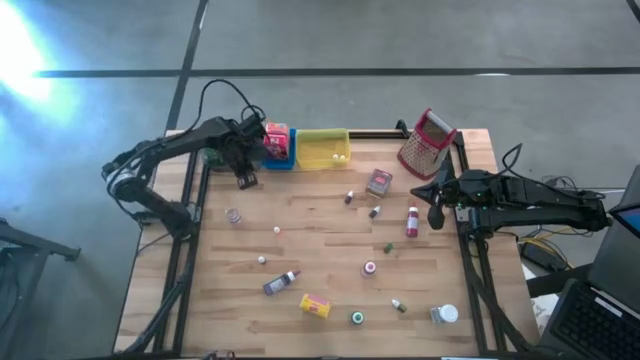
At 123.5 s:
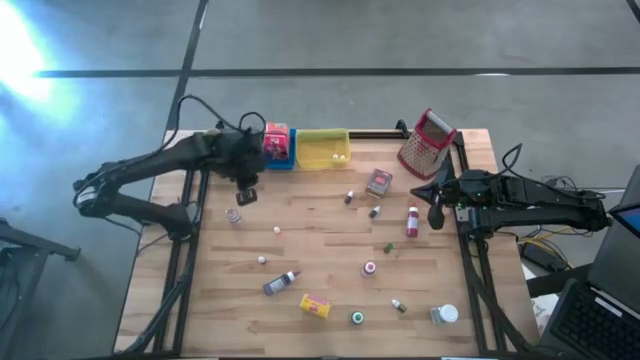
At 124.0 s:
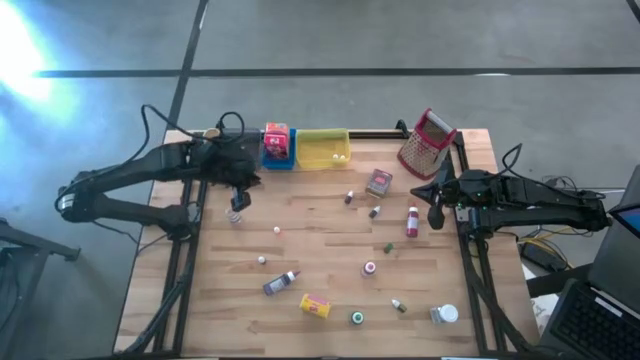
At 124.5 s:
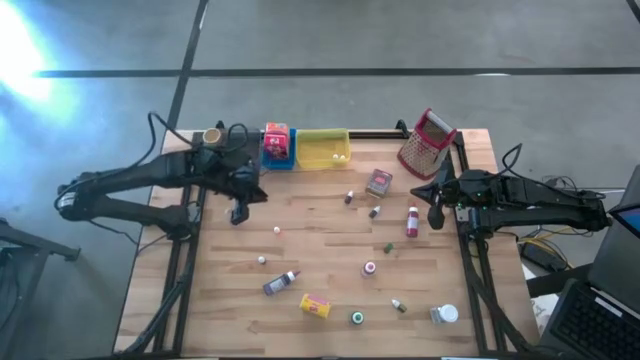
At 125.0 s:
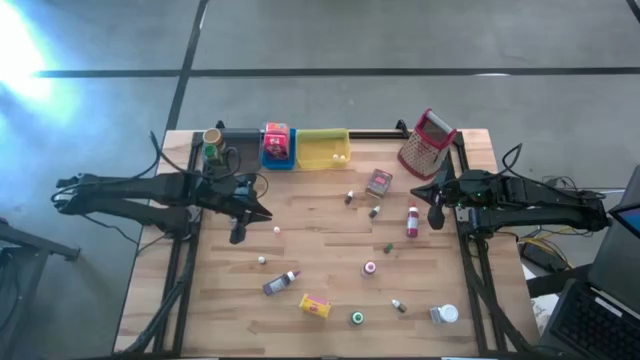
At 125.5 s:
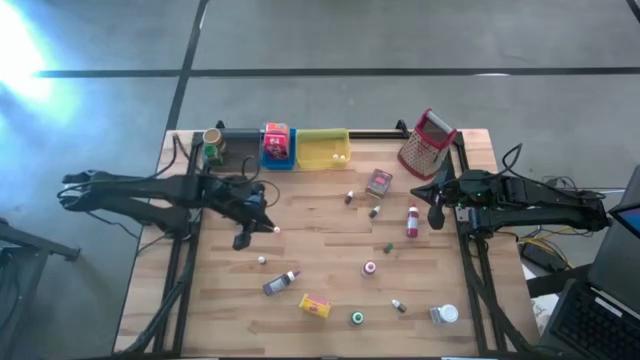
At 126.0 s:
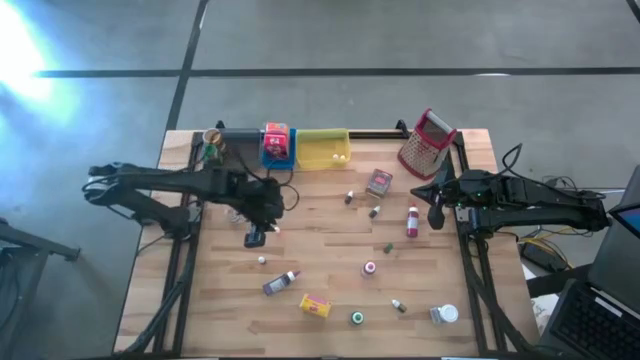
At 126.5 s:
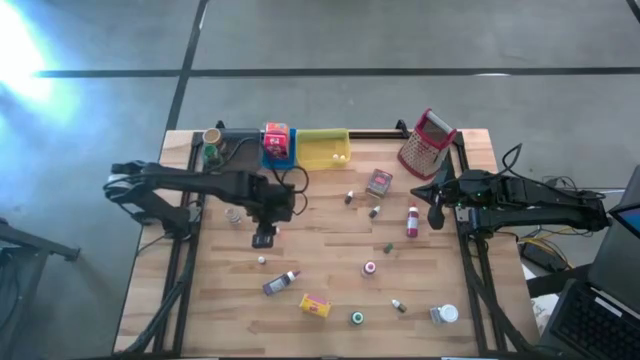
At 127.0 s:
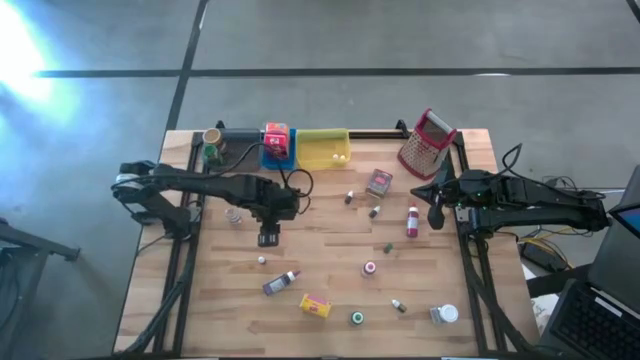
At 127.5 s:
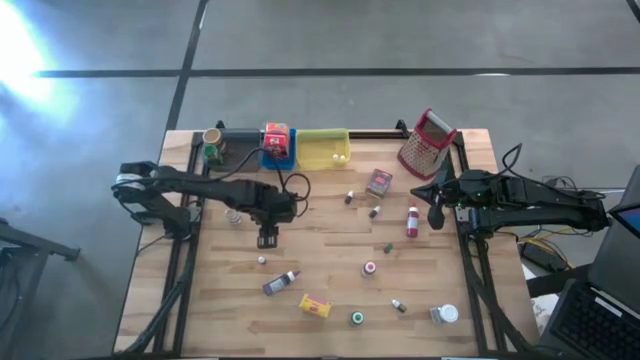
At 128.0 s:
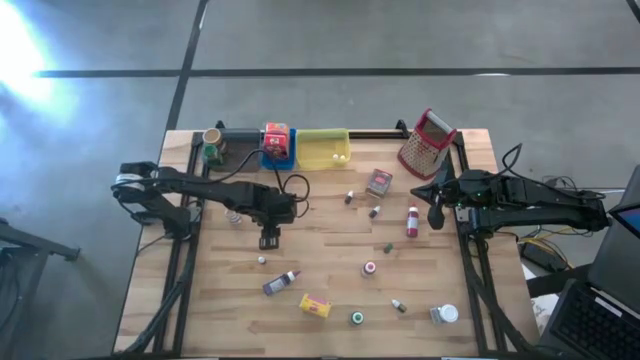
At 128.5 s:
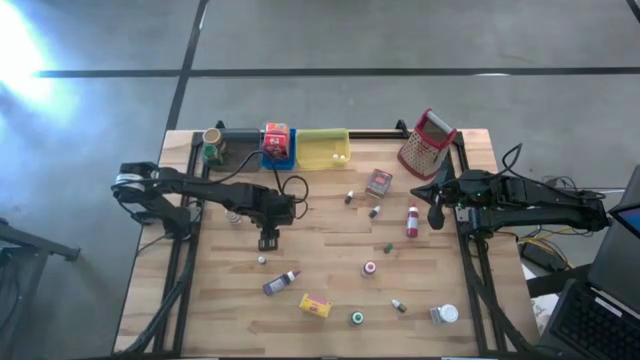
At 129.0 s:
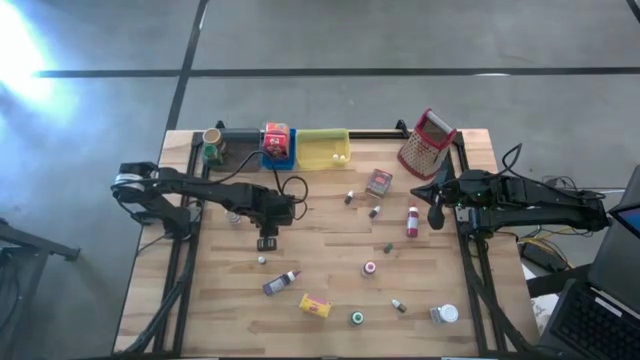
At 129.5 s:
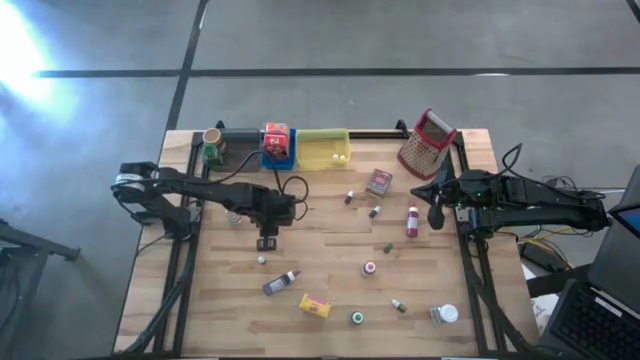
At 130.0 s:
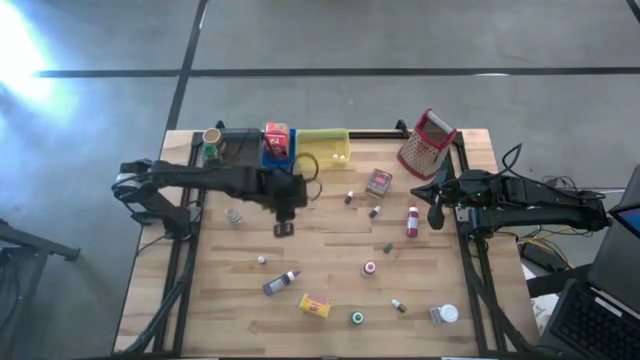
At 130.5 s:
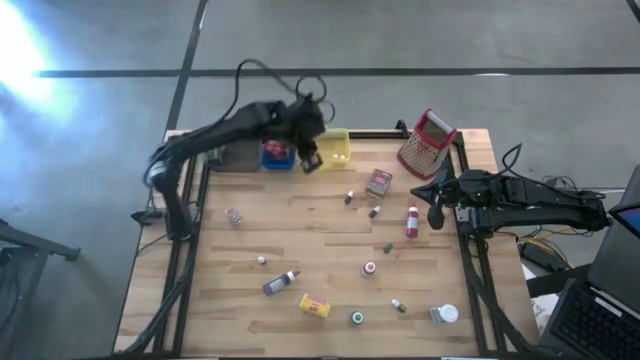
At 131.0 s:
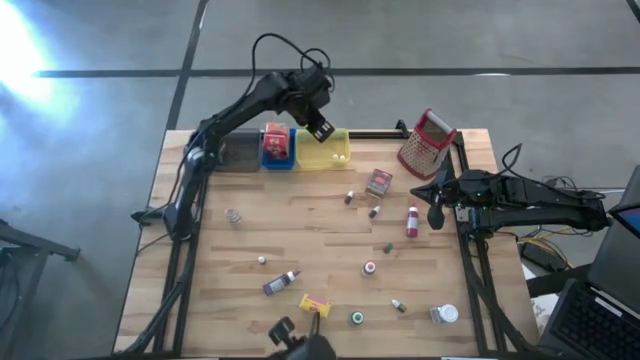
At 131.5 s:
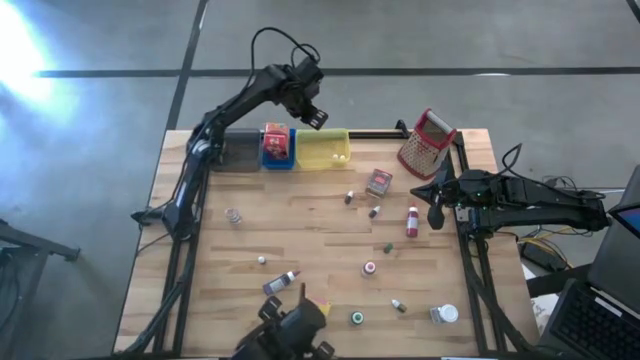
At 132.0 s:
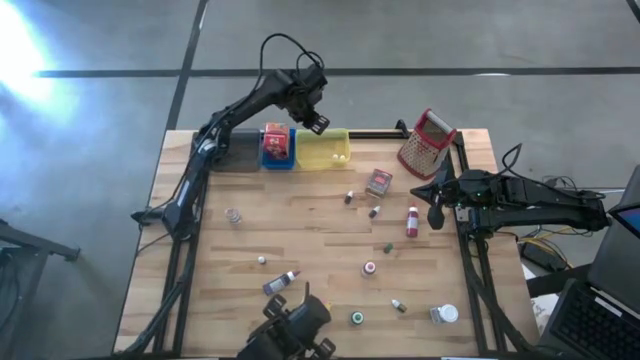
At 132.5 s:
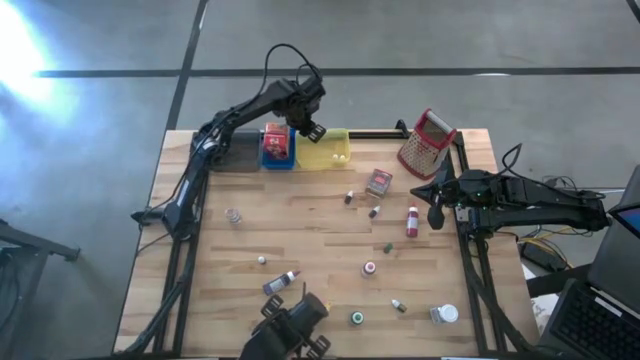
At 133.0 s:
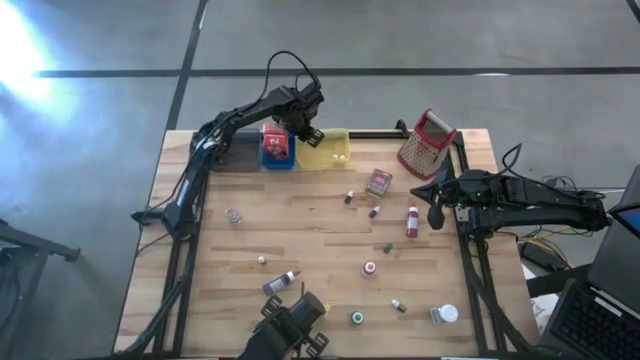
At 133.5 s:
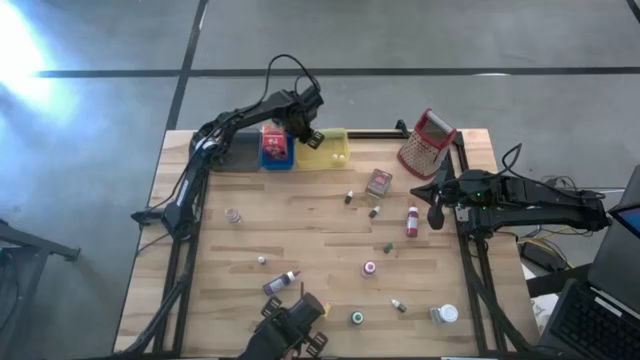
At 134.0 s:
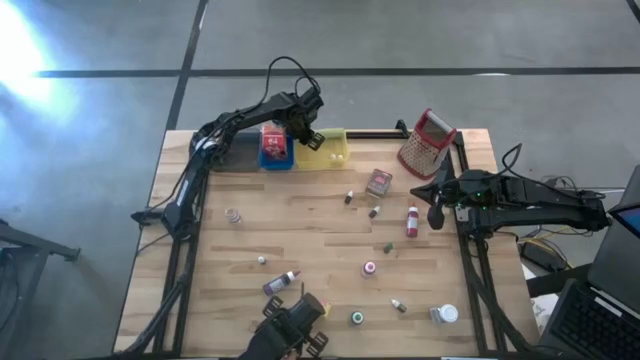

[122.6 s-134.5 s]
Task: Pick & Place Kitchen Items
Put the orange food coloring bottle into the yellow bin

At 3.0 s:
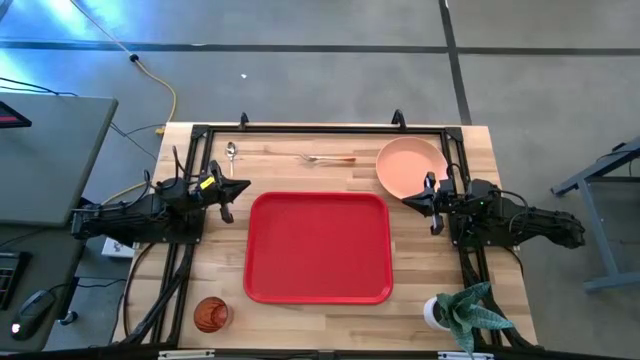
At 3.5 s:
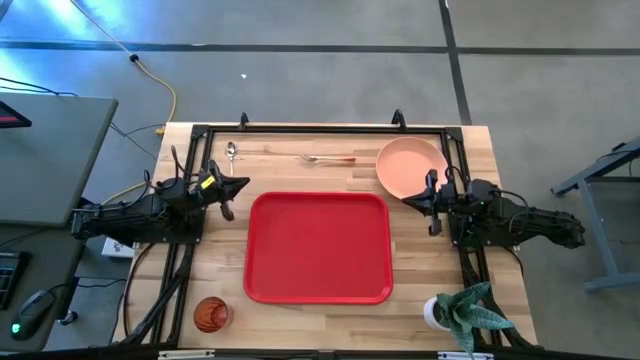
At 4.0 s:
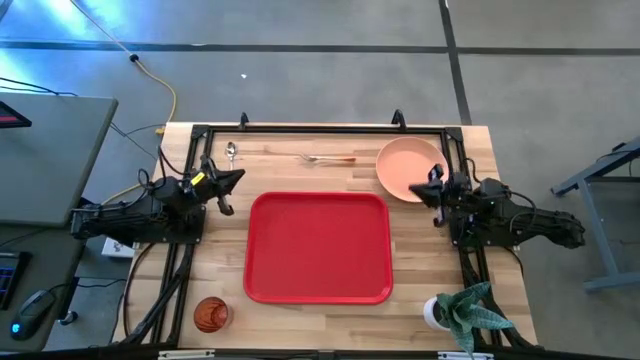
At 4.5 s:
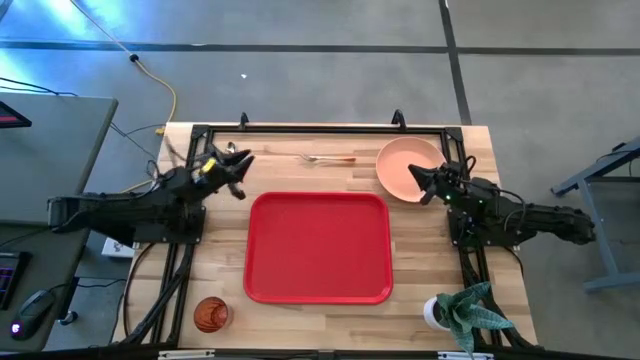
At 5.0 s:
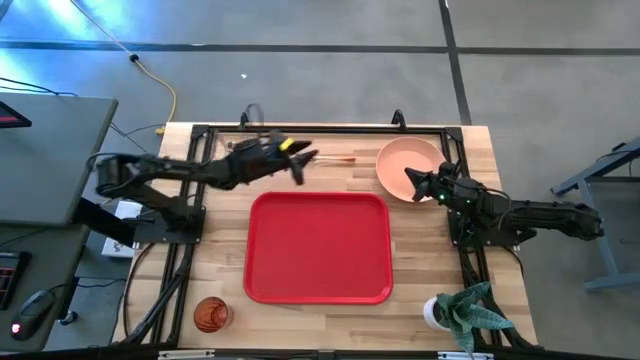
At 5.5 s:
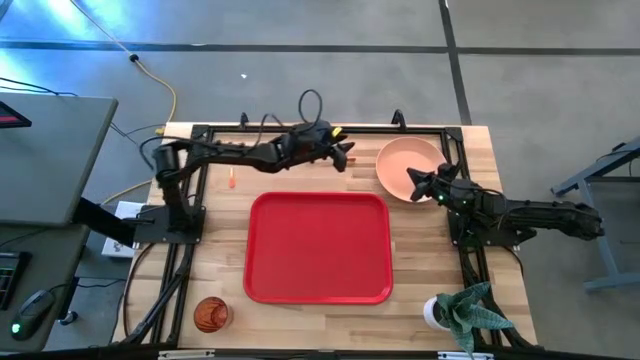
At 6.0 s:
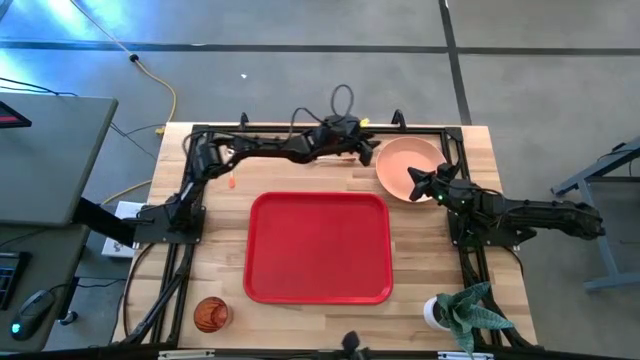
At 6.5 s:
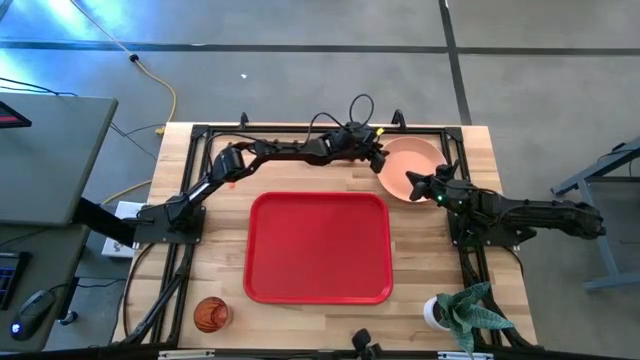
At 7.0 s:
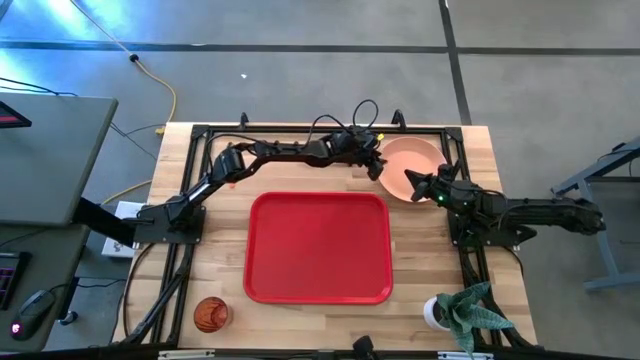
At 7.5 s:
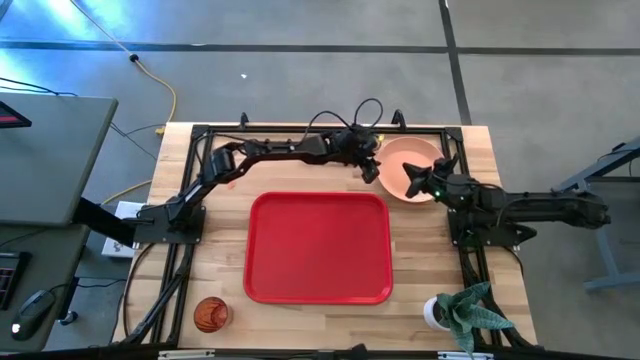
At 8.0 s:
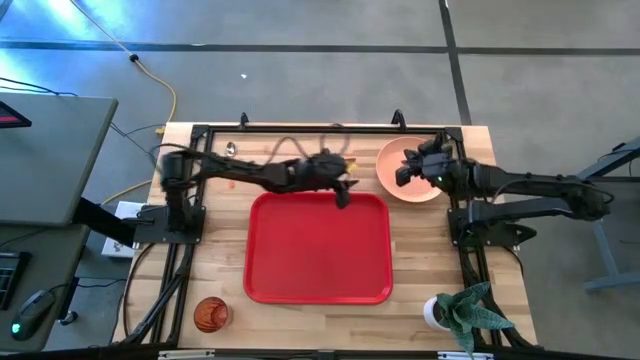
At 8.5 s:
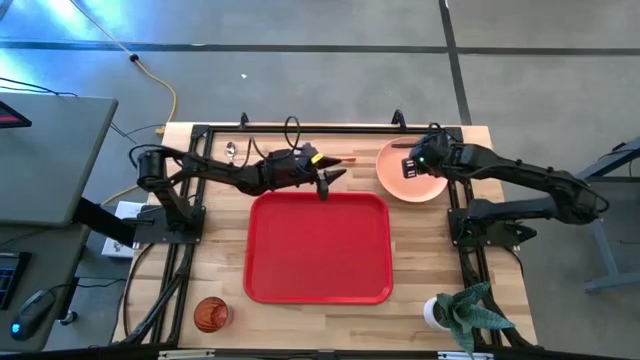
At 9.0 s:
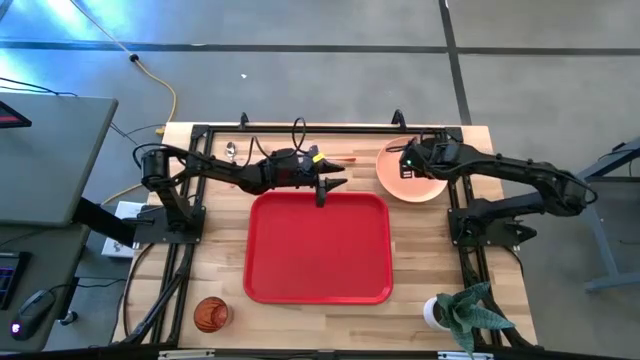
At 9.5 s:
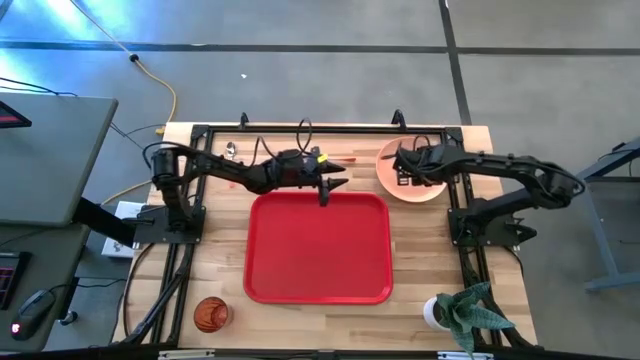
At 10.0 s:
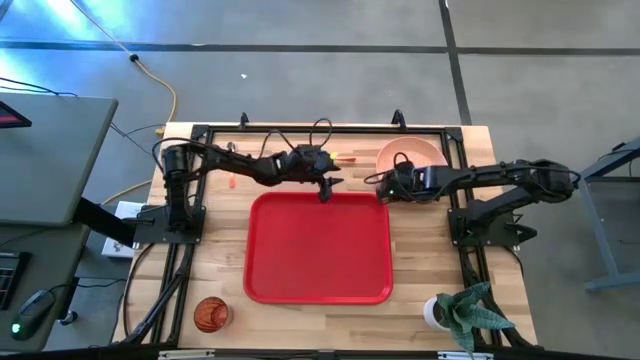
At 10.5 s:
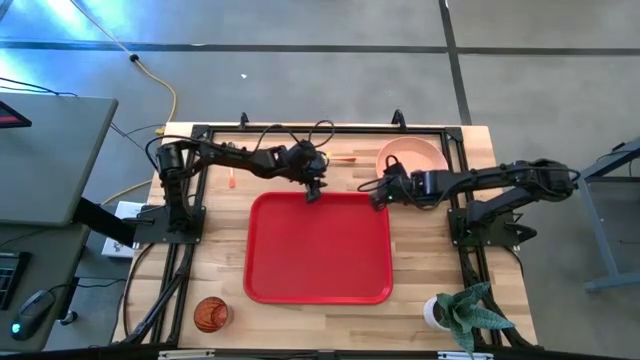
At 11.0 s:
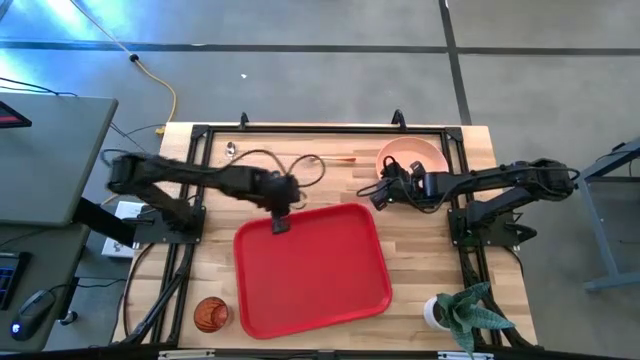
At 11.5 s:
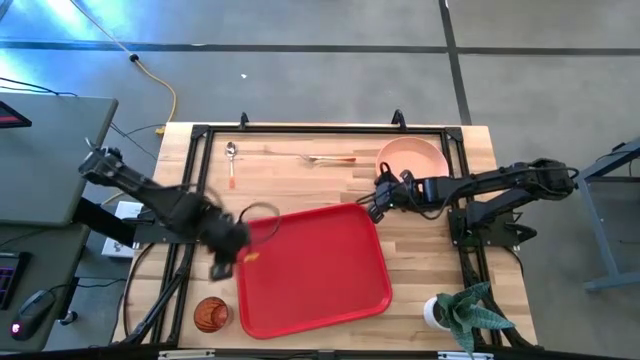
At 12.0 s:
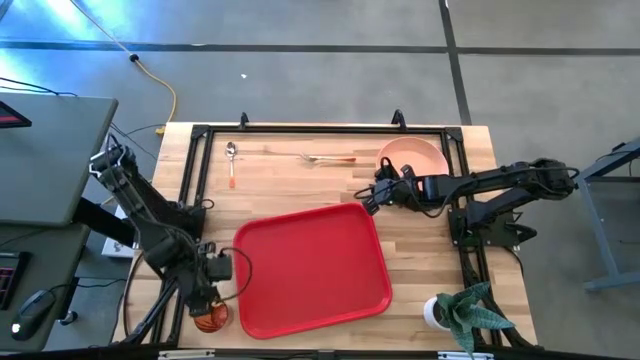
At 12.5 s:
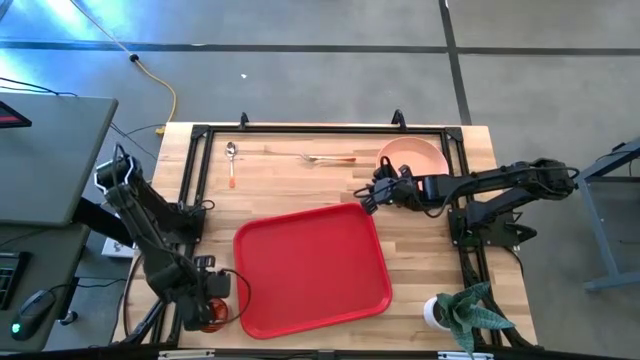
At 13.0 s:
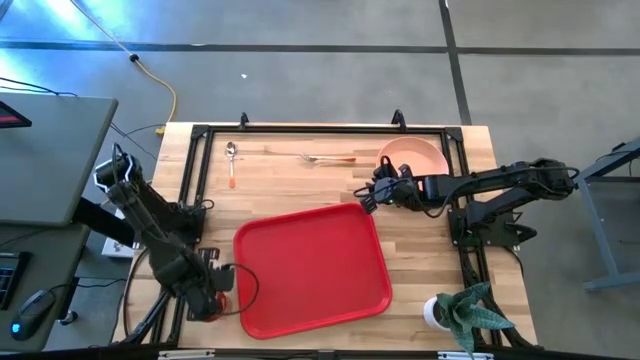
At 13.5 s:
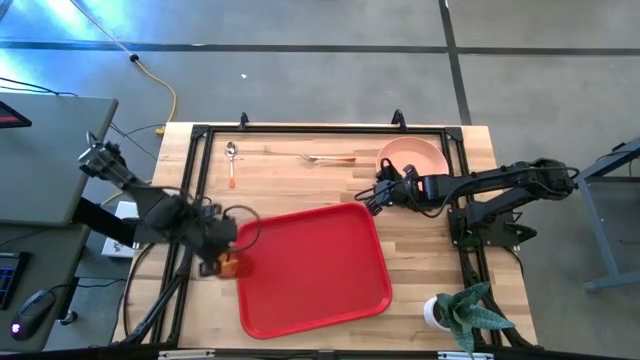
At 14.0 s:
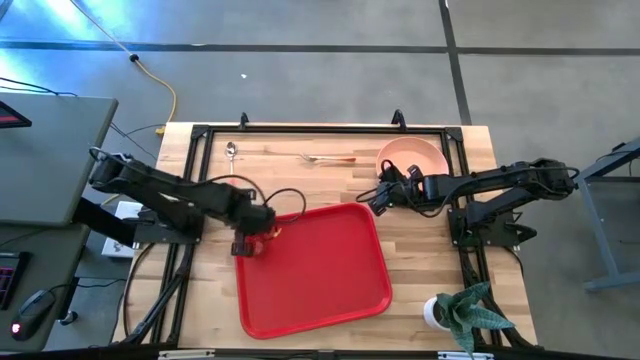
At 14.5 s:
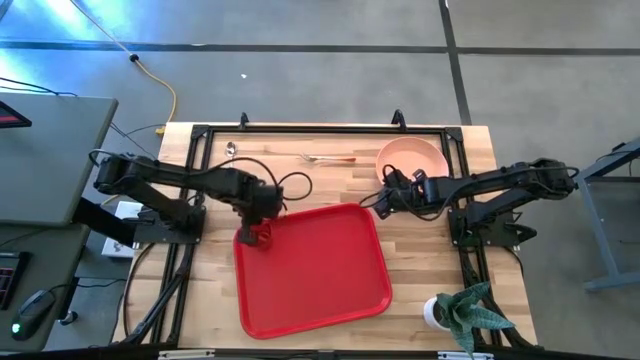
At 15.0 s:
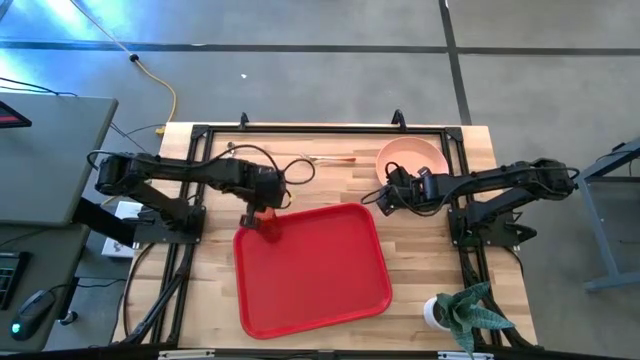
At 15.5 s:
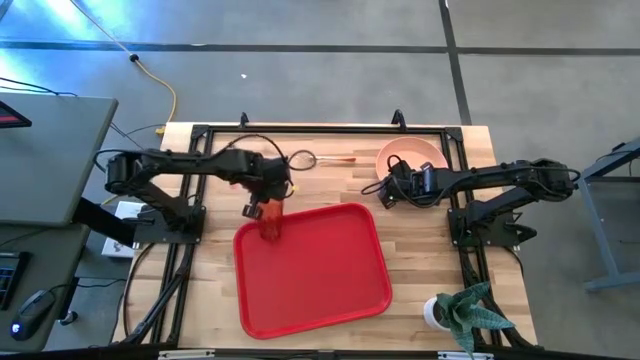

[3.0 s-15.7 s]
Task: Pick and place plate/cup/fork/spoon on tray
Put the brown cup on the red tray
